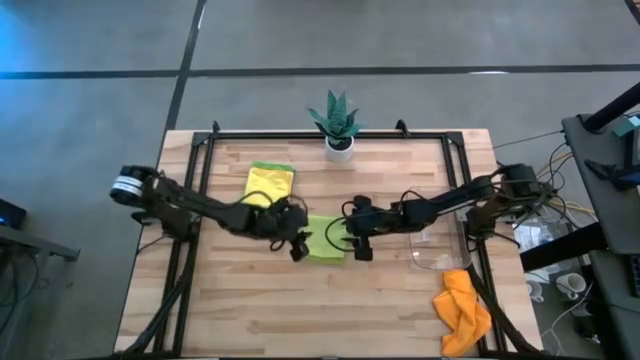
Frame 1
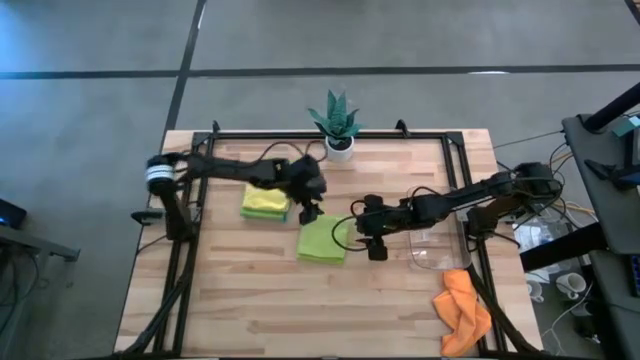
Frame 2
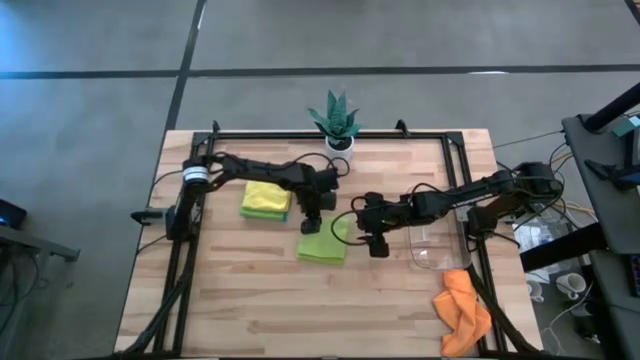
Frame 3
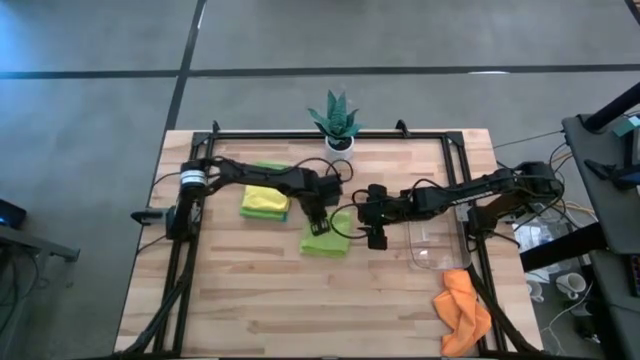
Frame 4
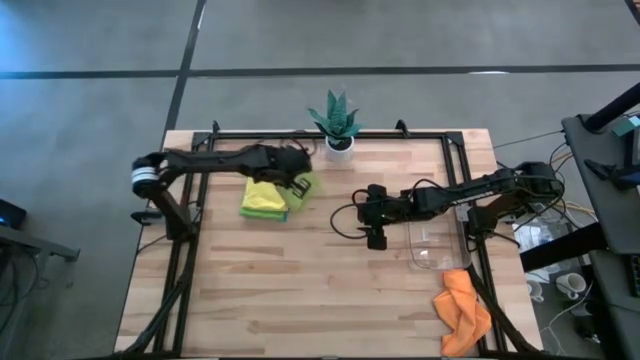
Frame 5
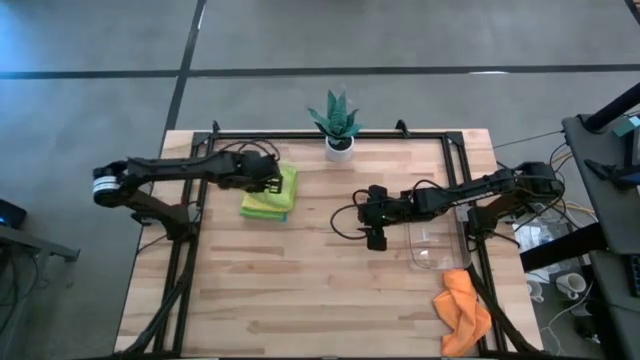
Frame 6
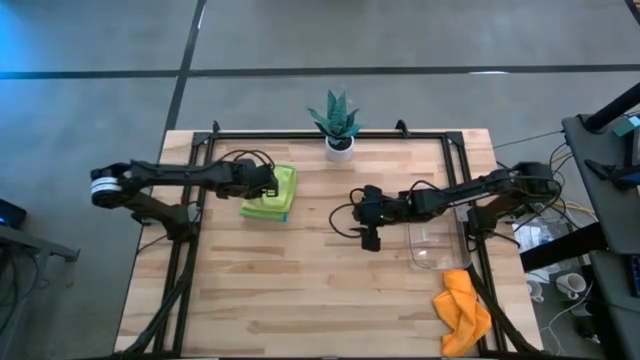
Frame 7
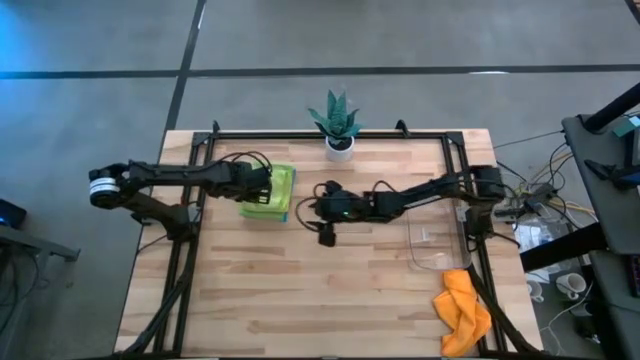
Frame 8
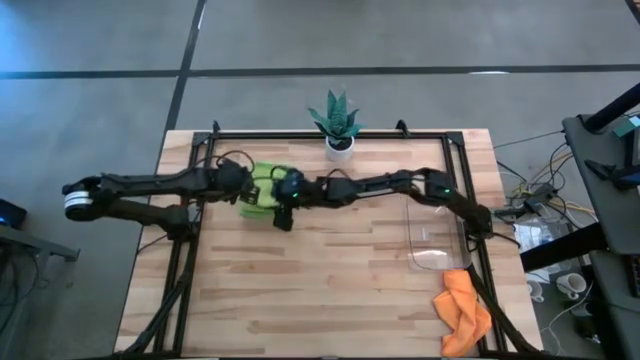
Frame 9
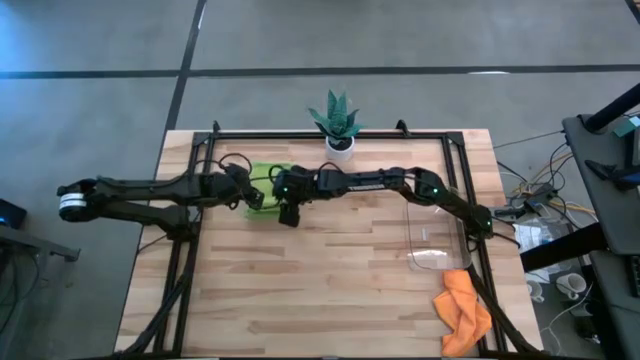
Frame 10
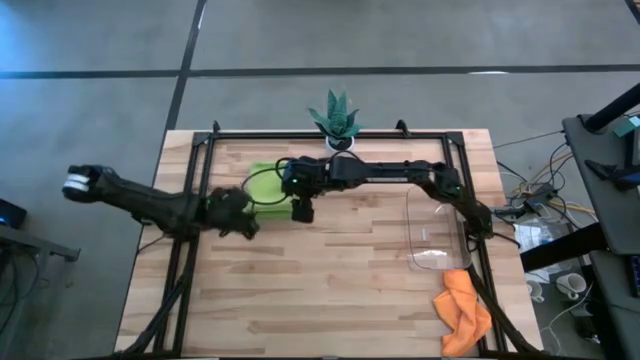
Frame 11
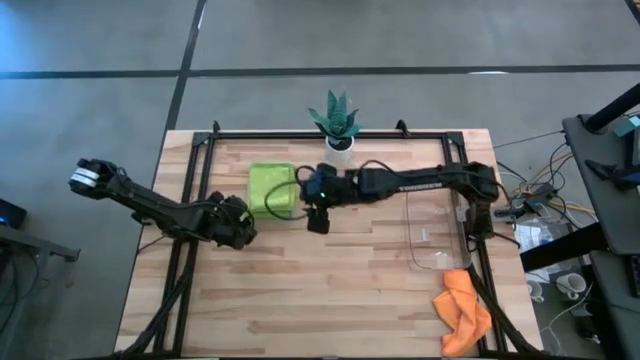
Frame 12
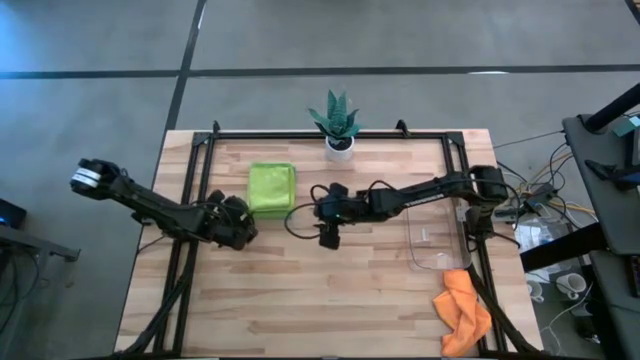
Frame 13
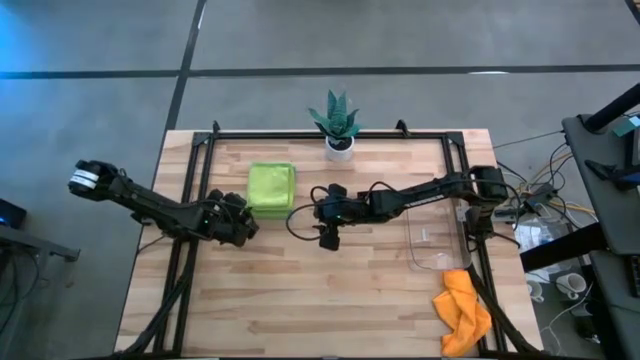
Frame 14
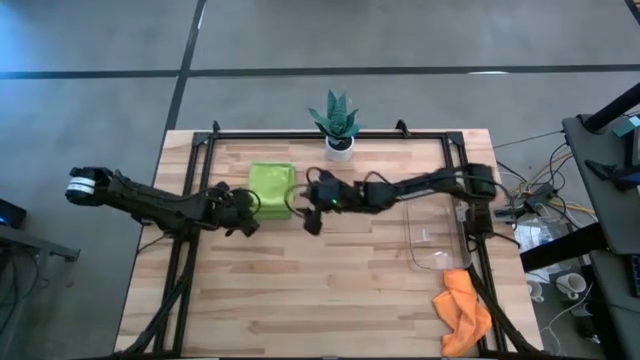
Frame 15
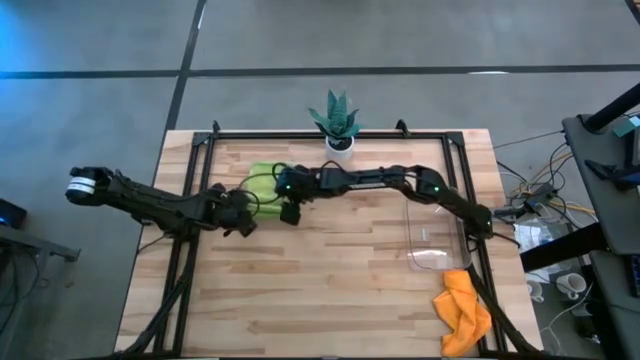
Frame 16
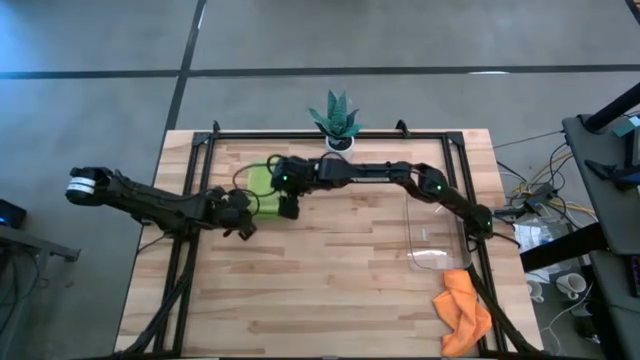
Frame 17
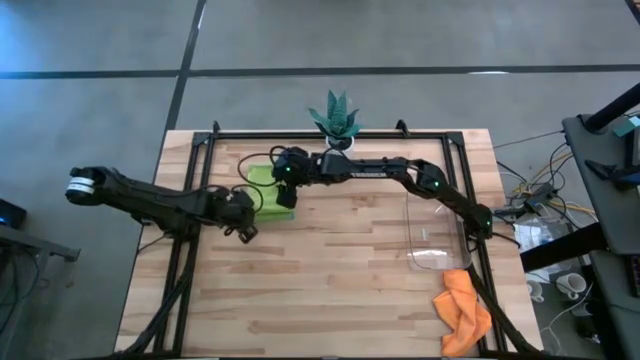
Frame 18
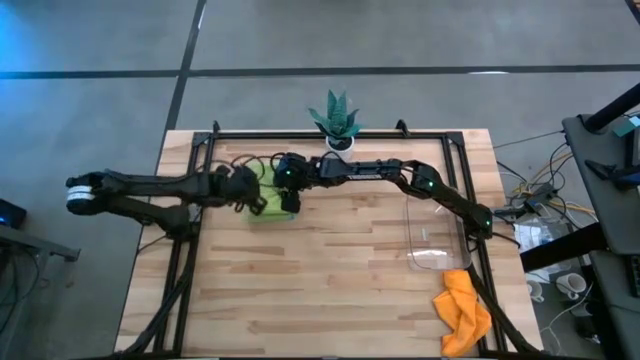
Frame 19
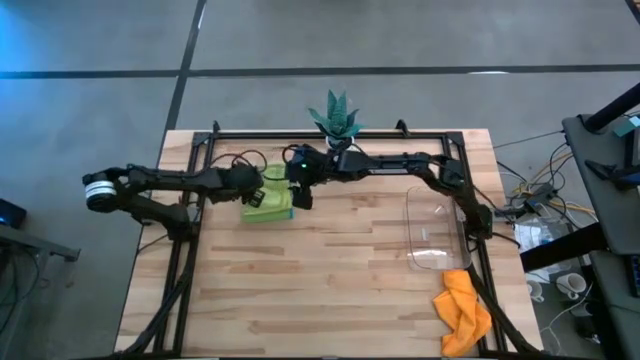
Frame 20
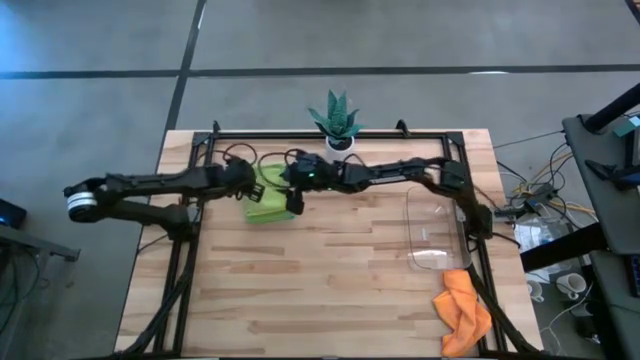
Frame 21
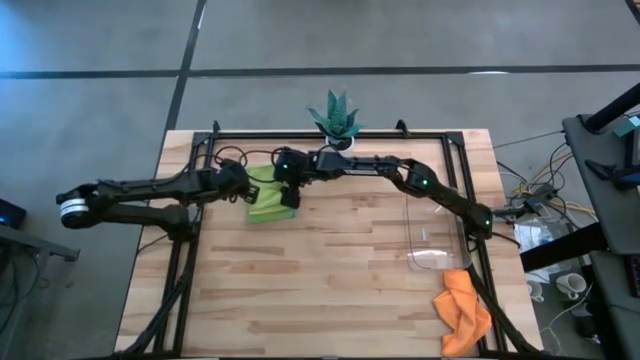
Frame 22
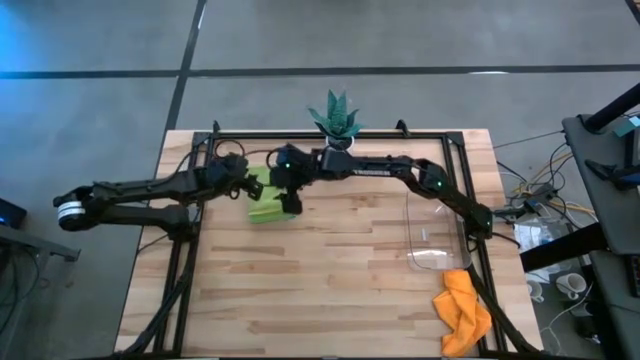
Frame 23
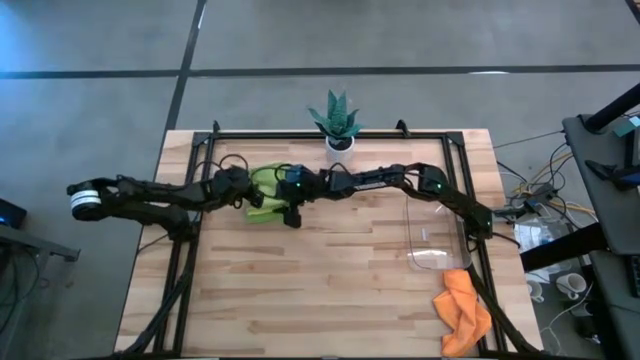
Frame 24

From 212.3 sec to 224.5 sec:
Task: Fold microfiber towels
Stack the light green towel on top of the yellow towel

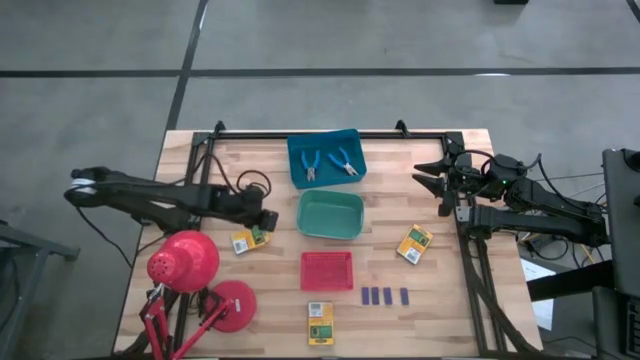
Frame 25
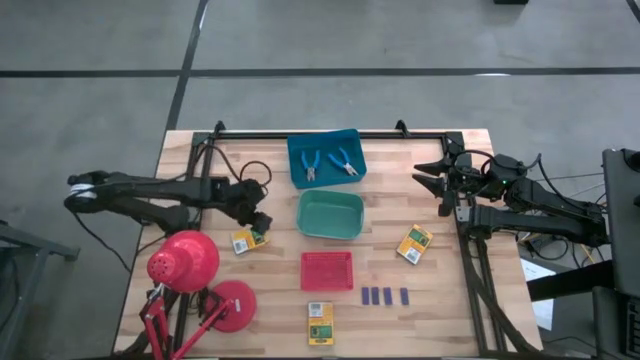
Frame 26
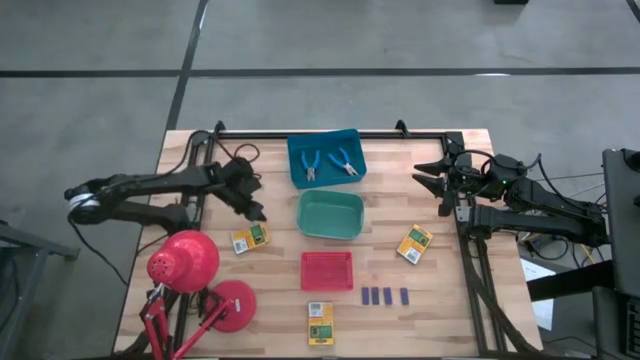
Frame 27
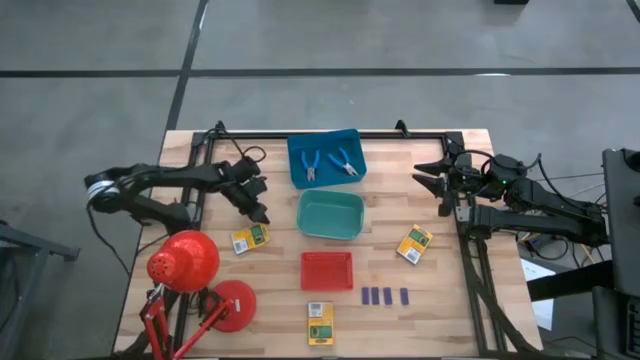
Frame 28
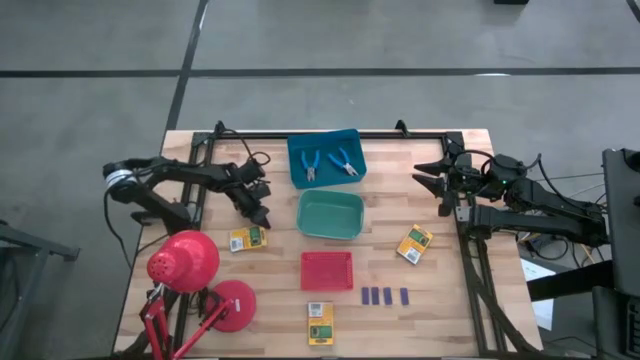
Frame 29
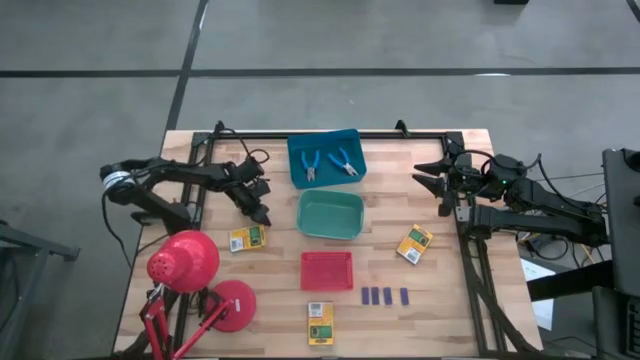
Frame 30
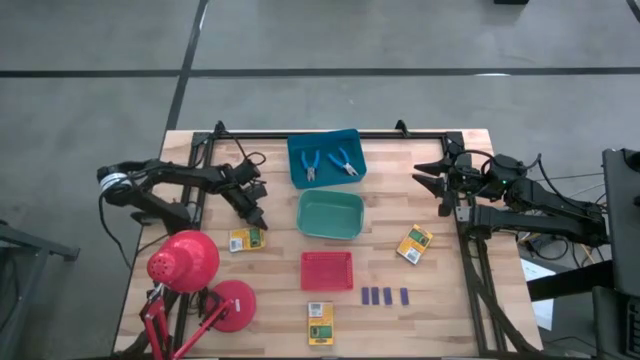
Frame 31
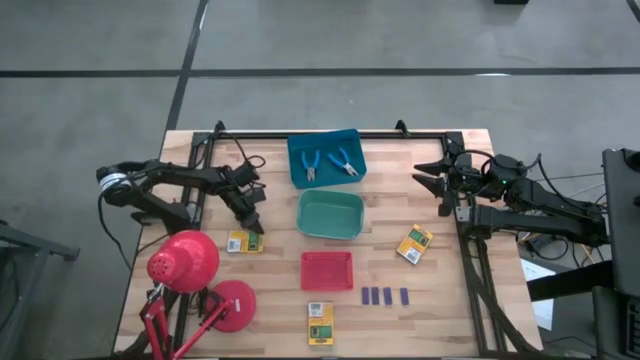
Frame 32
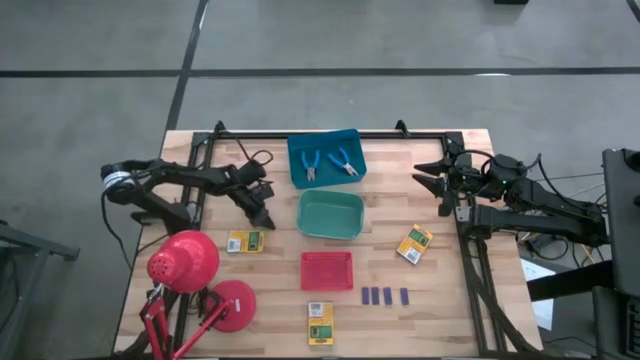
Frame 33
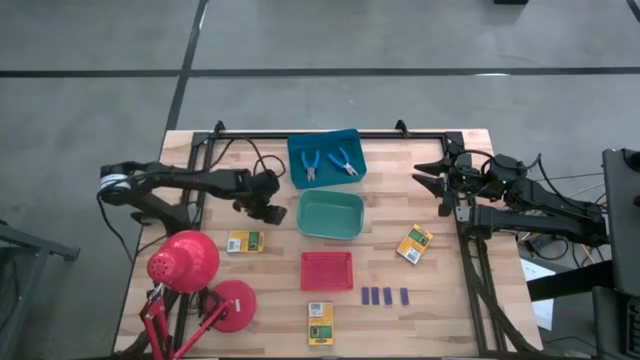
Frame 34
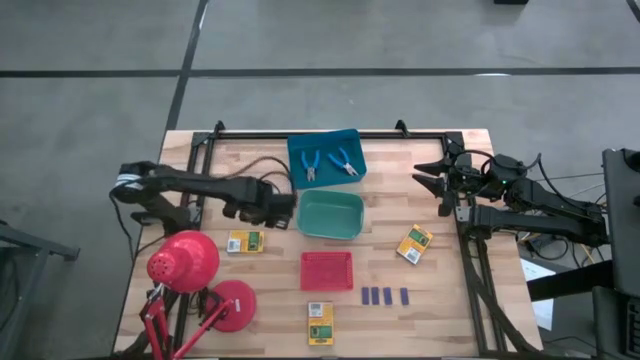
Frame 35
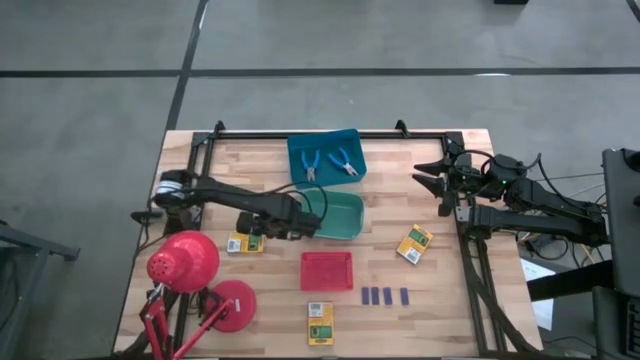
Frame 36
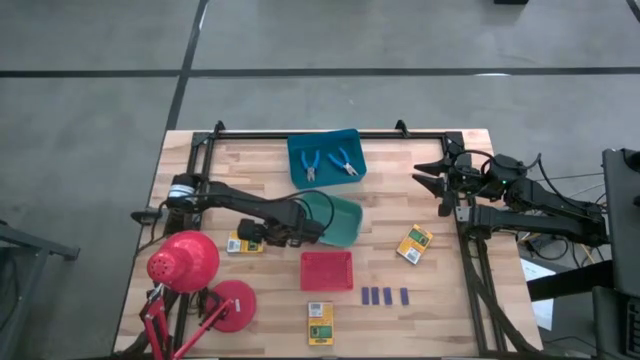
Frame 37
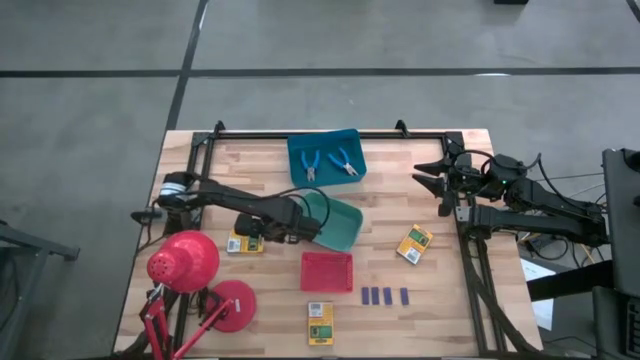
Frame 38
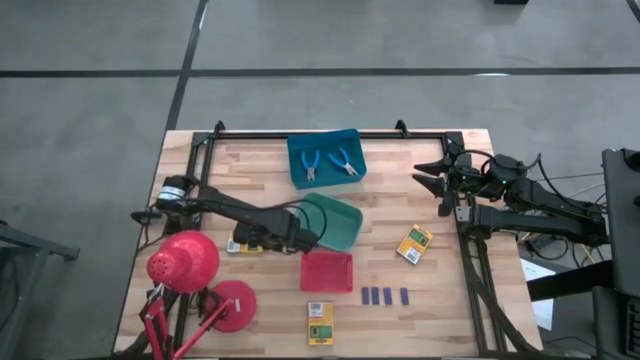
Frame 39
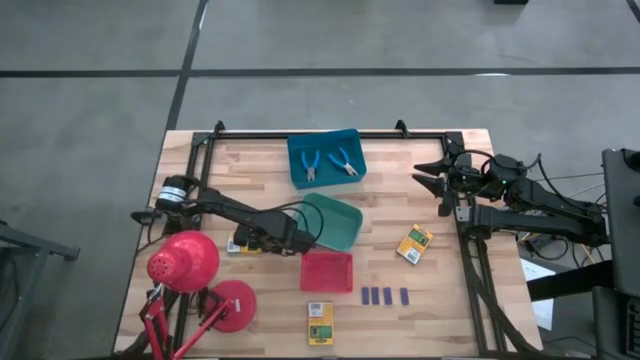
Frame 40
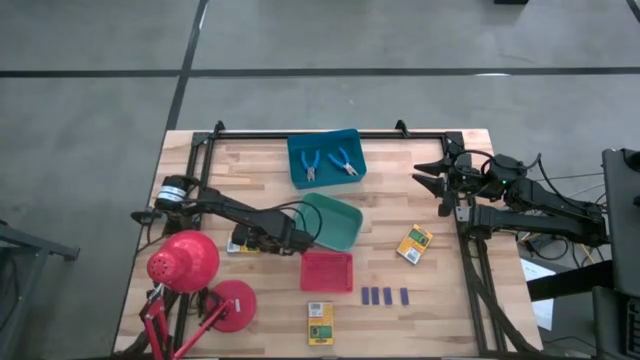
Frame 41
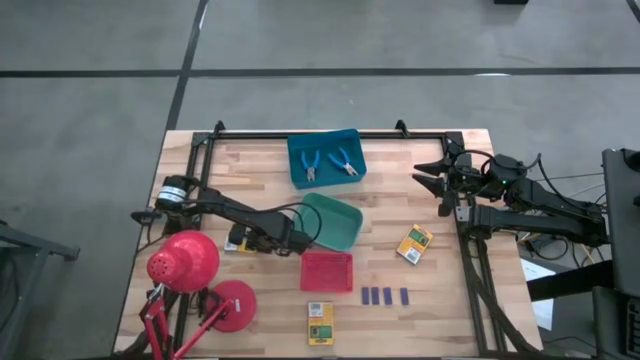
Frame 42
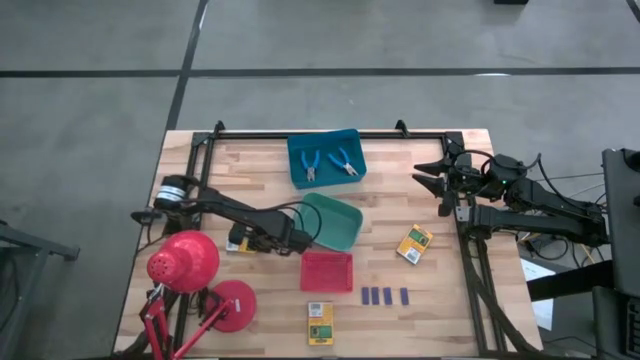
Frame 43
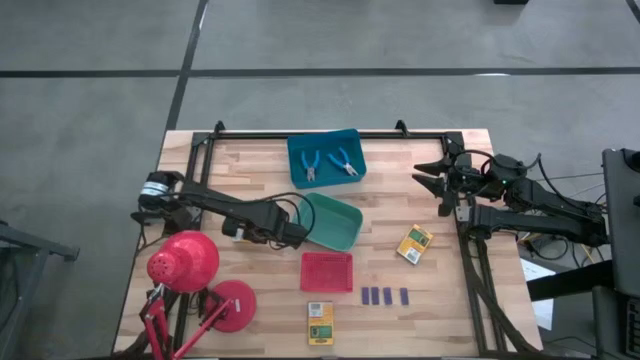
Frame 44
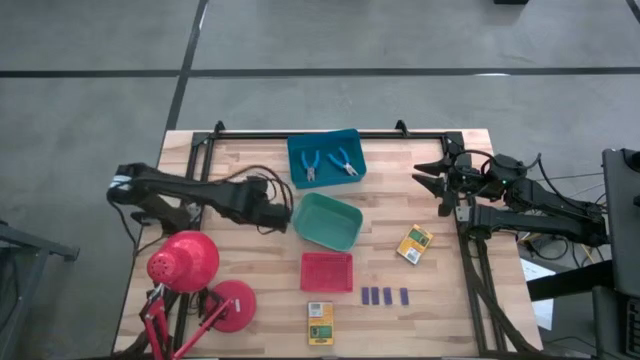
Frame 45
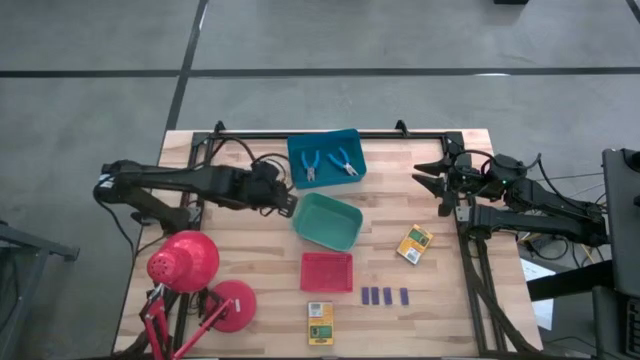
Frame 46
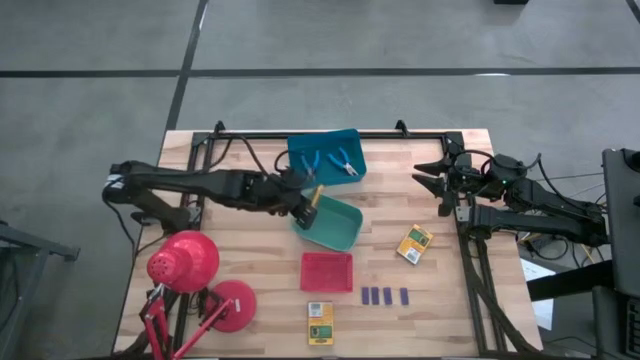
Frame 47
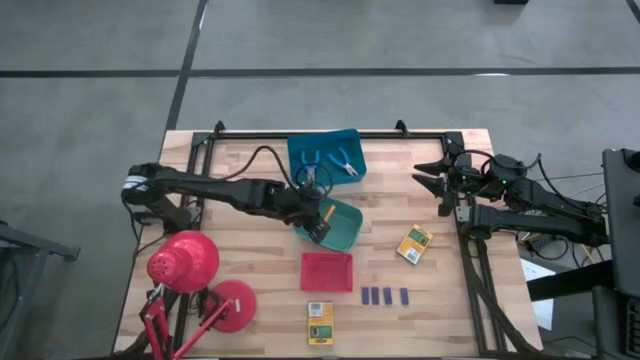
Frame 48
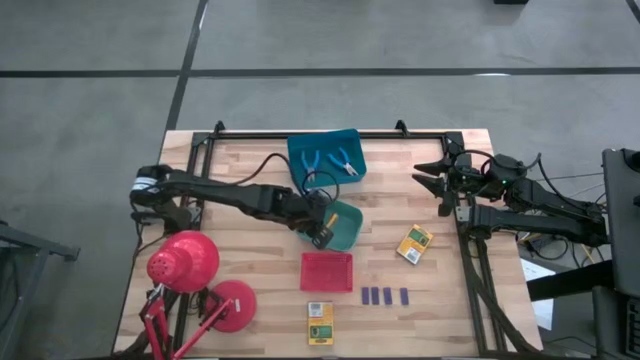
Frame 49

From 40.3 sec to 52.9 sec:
Task: Pick & Place School Supplies
Put the yellow crayon box in the green bin
